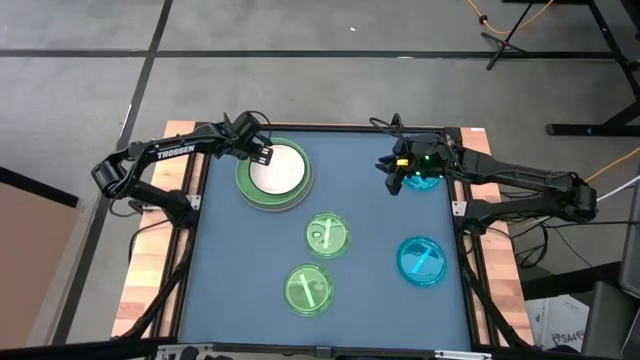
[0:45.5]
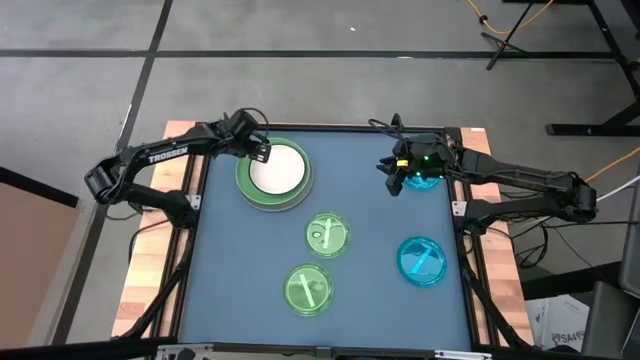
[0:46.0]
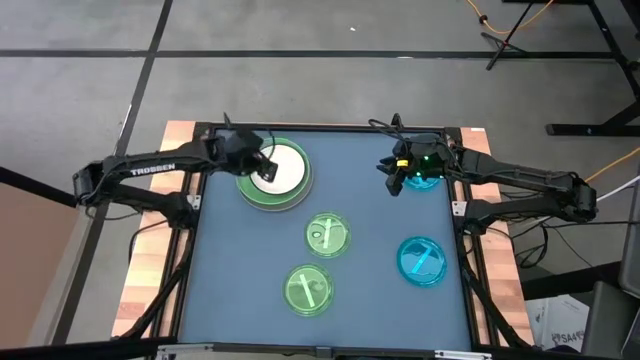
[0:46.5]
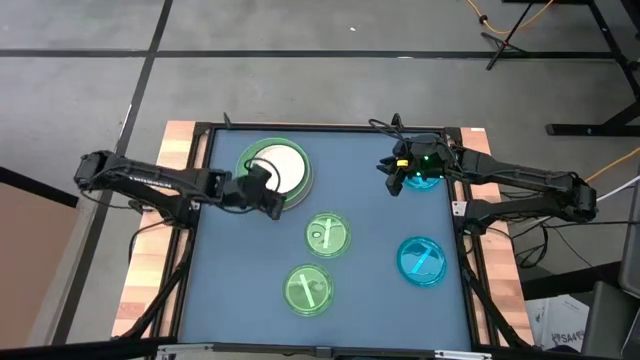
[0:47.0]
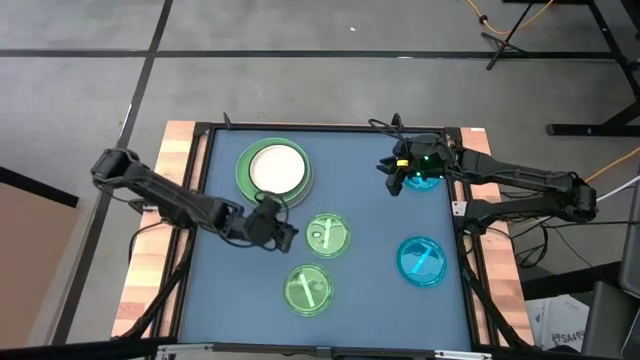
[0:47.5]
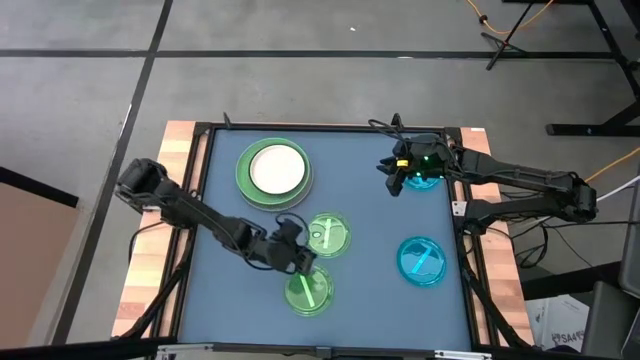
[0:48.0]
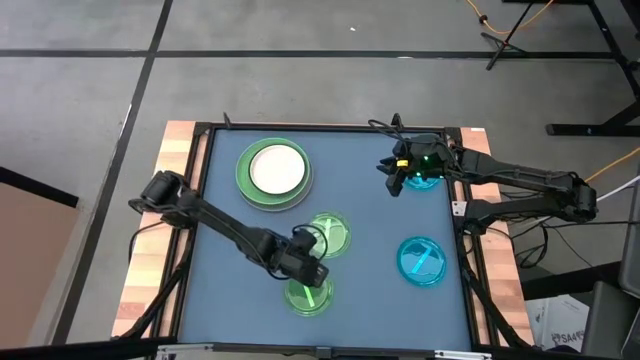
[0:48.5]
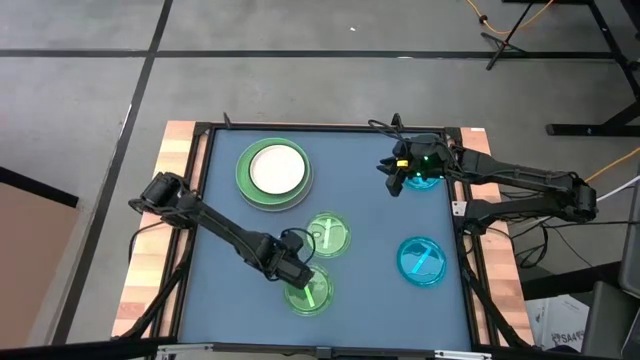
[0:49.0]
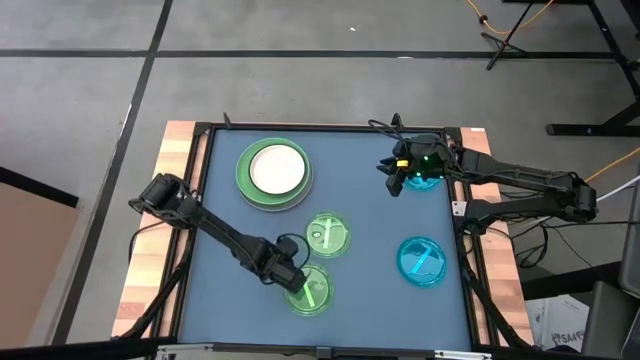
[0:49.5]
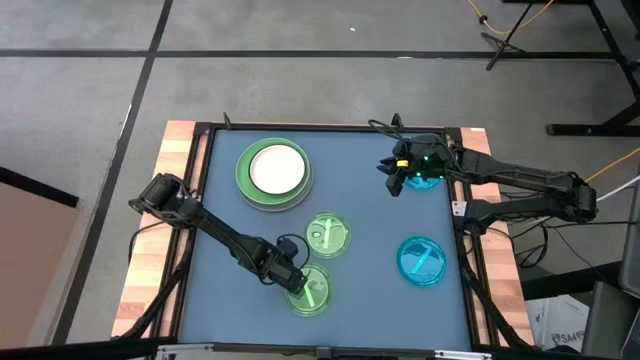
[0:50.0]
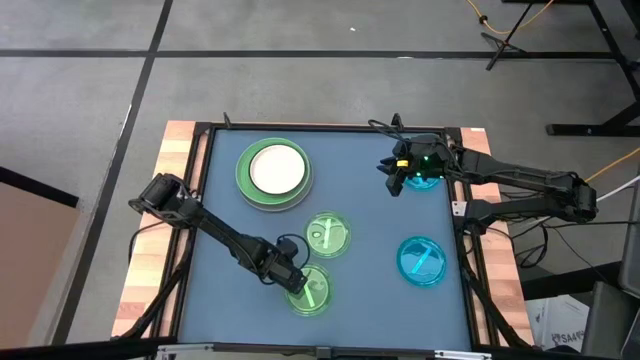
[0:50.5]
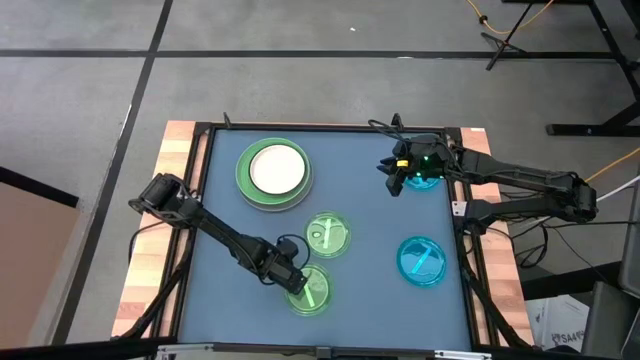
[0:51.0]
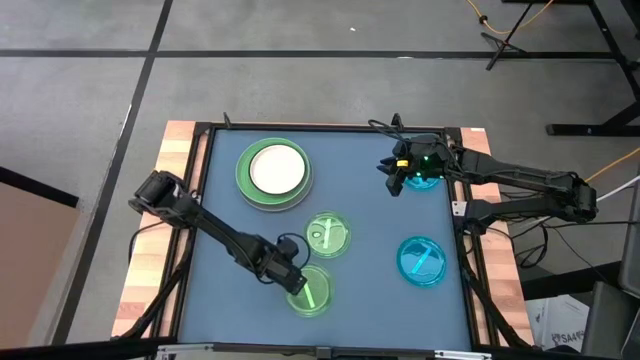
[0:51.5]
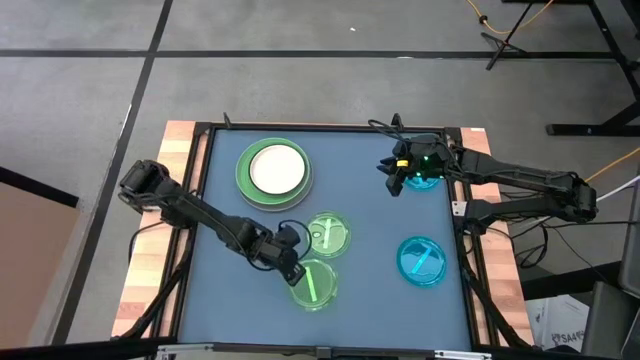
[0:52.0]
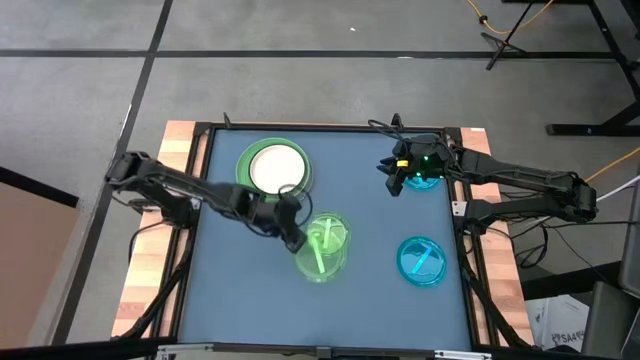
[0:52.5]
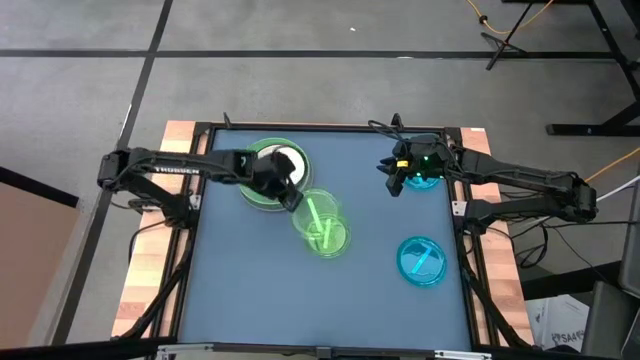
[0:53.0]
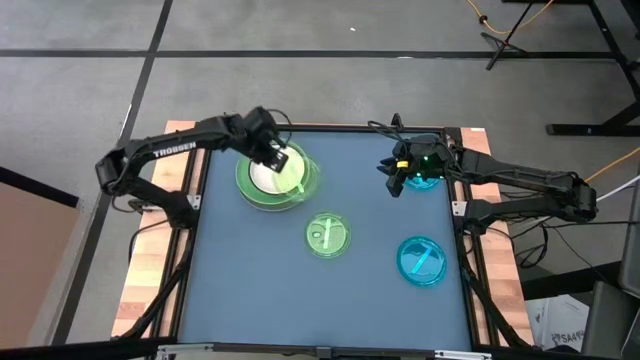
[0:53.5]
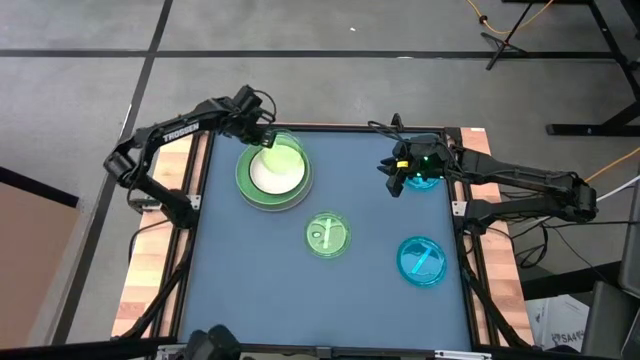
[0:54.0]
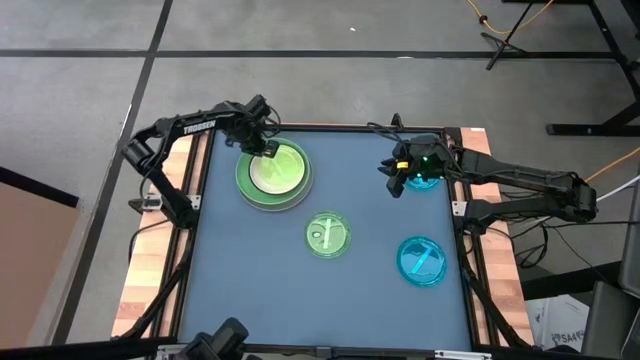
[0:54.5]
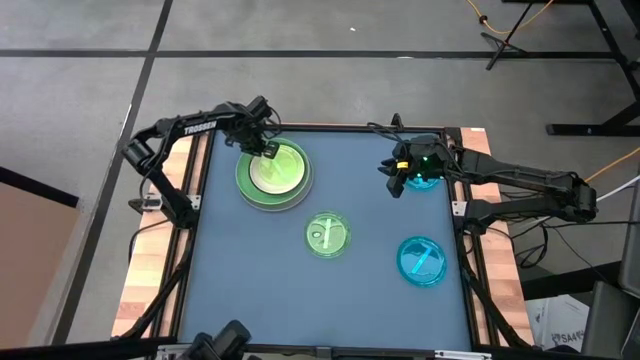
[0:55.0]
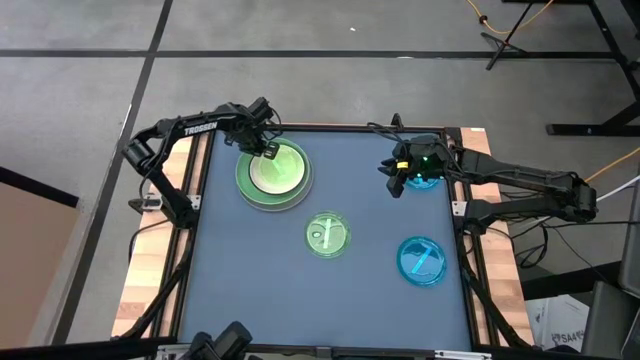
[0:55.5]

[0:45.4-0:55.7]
Task: Stack plastic plates
Stack the bottom light green plate on top of the white plate

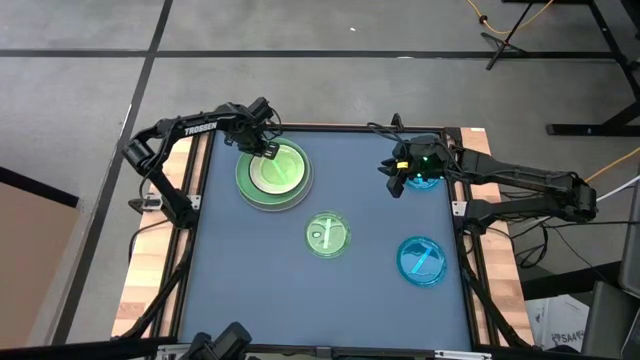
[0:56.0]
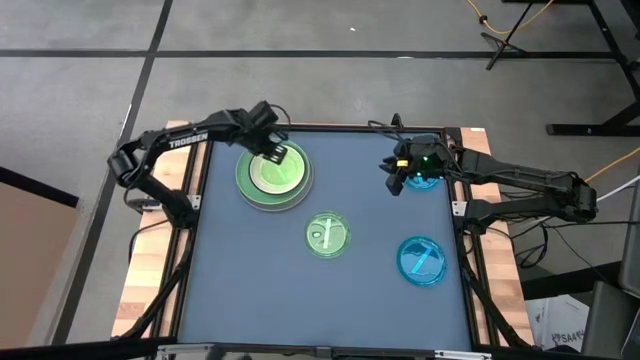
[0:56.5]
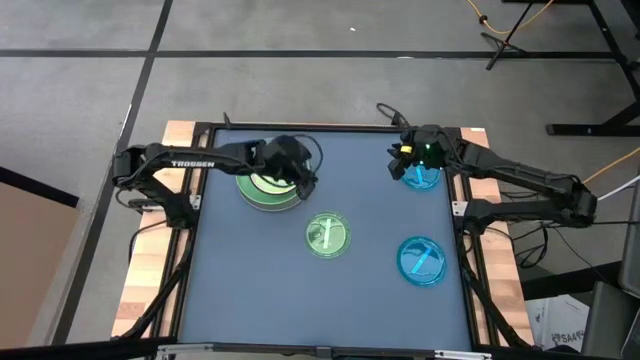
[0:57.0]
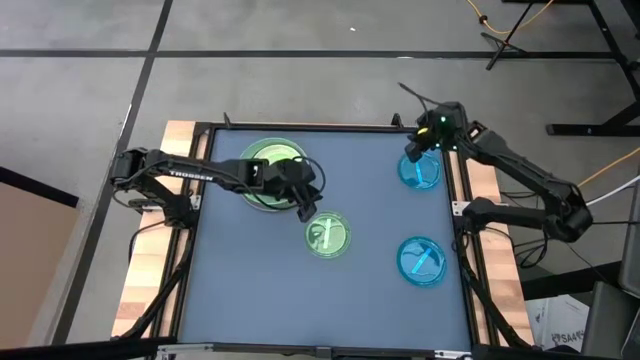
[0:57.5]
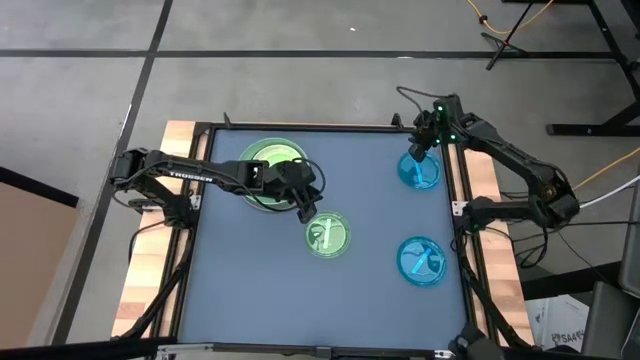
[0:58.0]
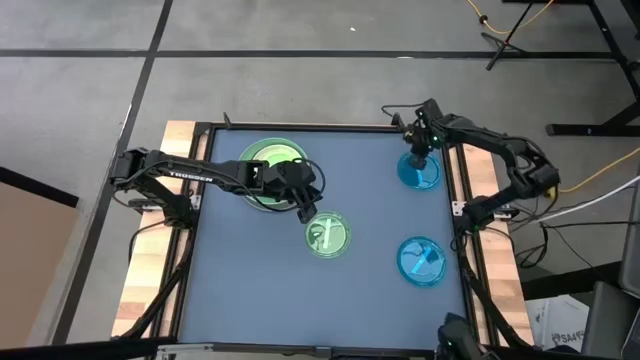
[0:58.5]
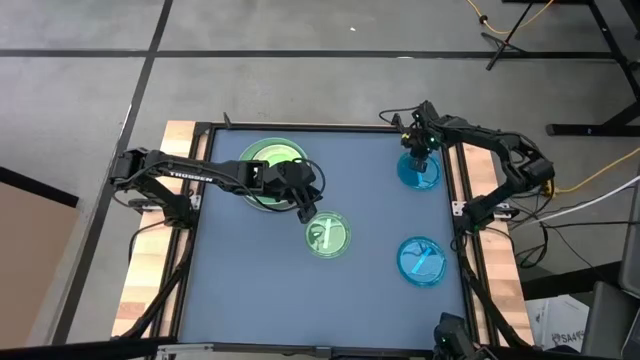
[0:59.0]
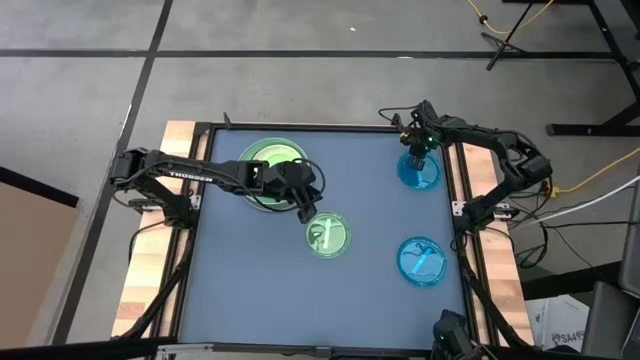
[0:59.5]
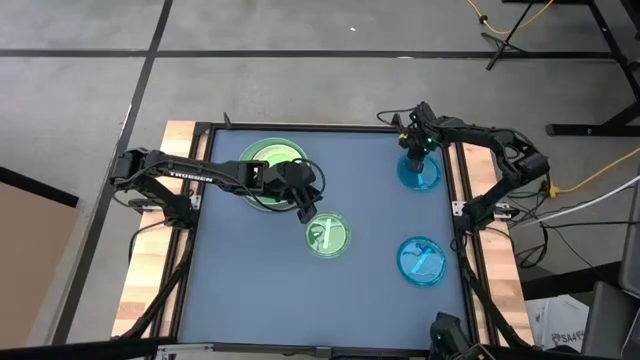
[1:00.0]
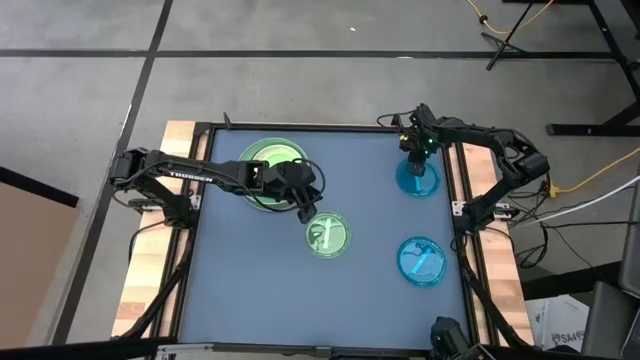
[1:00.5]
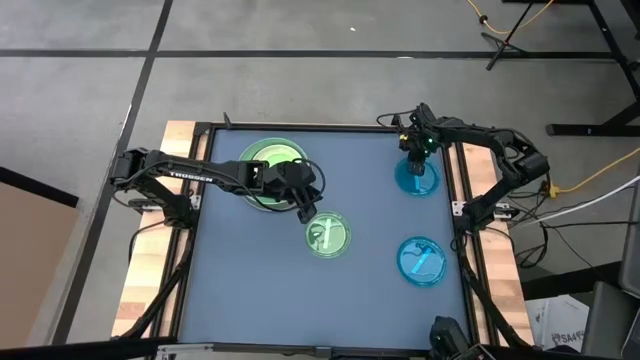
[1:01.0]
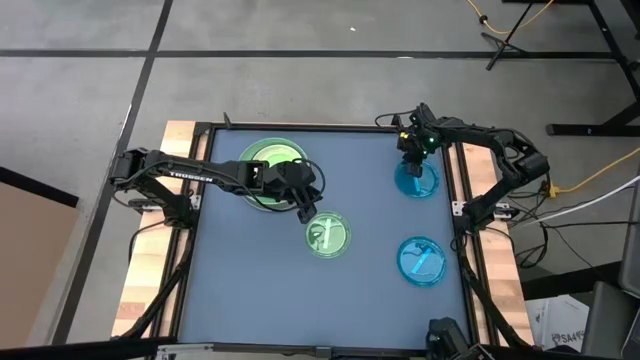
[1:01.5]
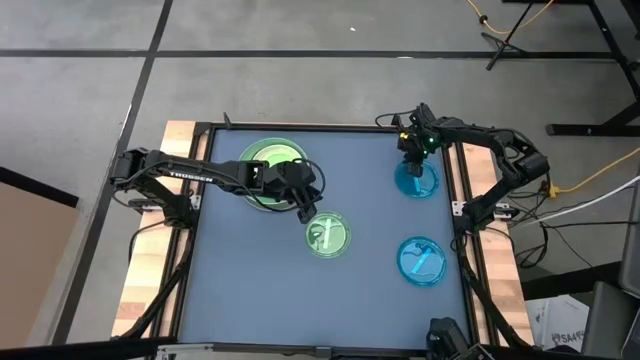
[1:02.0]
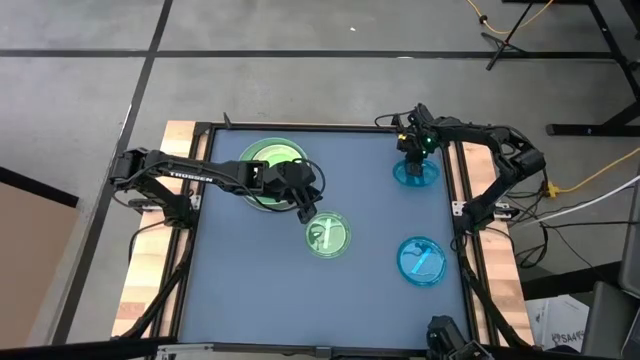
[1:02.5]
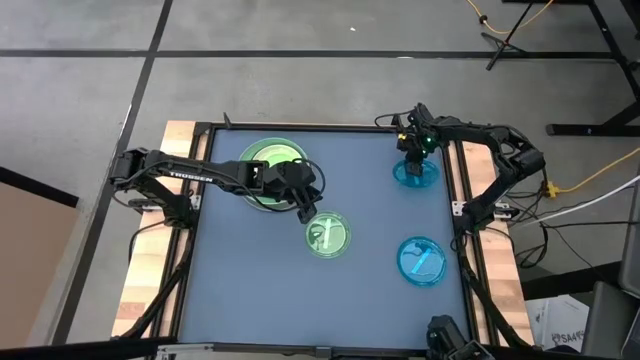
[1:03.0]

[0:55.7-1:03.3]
Stack the top blue plate on top of the light green plate
